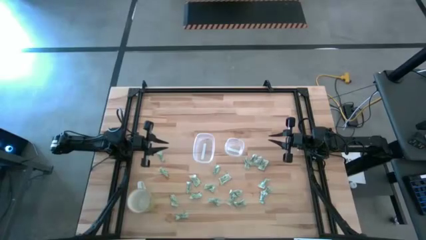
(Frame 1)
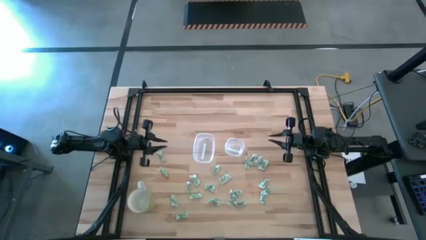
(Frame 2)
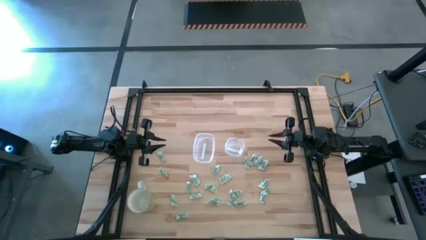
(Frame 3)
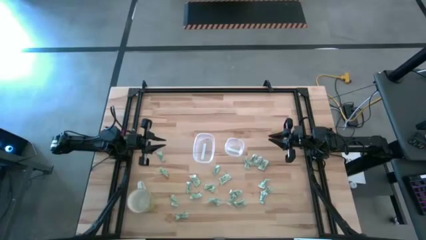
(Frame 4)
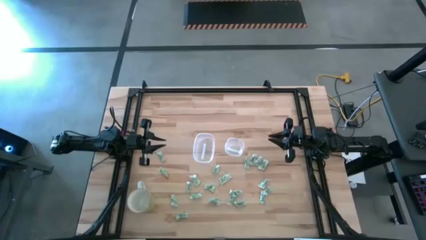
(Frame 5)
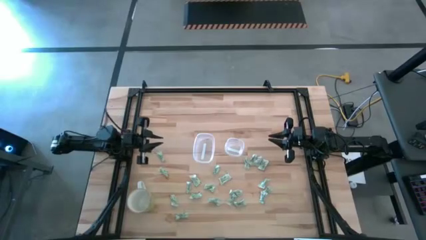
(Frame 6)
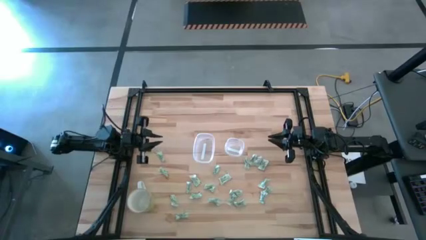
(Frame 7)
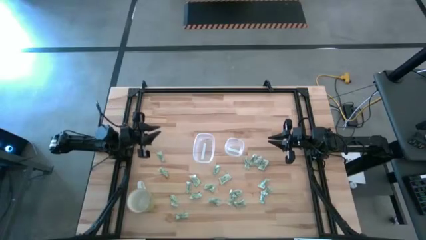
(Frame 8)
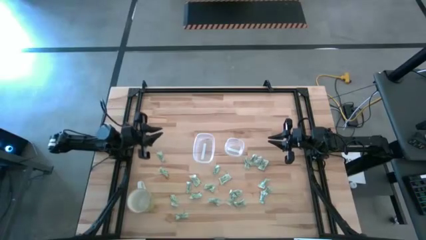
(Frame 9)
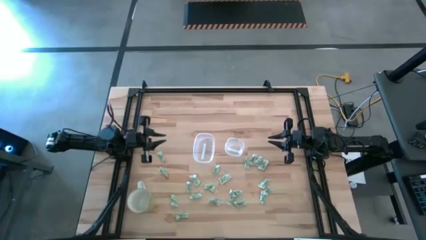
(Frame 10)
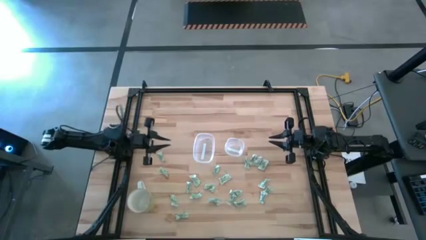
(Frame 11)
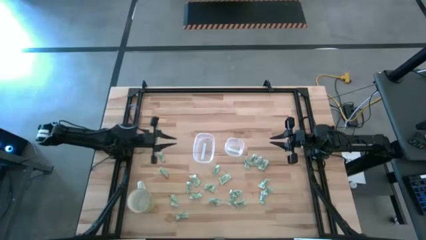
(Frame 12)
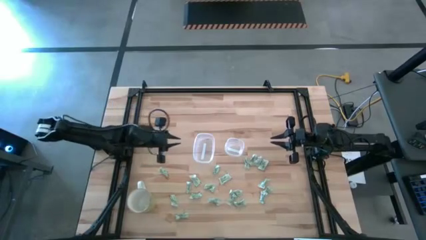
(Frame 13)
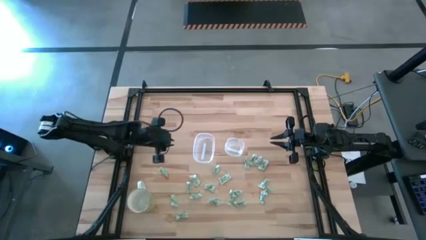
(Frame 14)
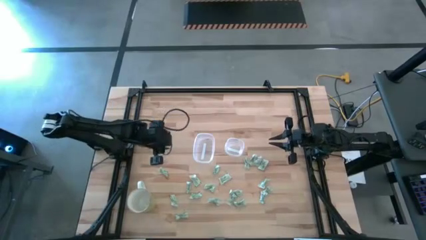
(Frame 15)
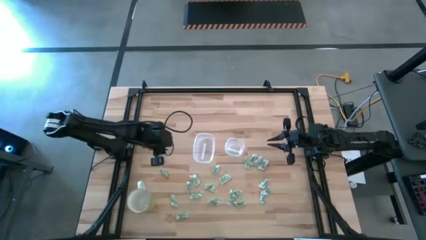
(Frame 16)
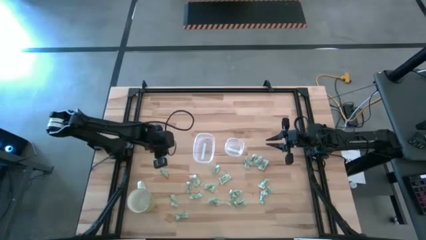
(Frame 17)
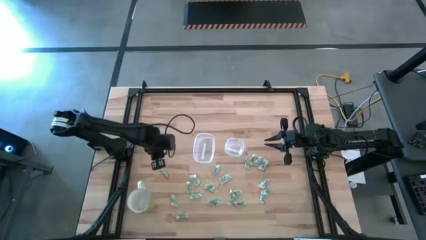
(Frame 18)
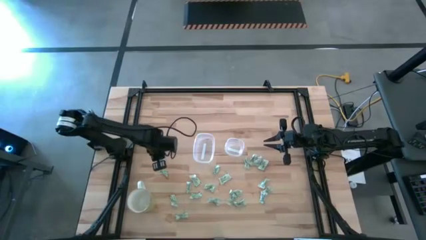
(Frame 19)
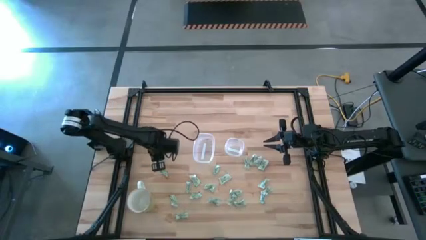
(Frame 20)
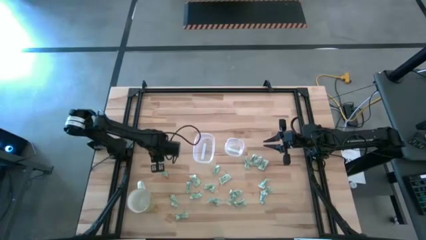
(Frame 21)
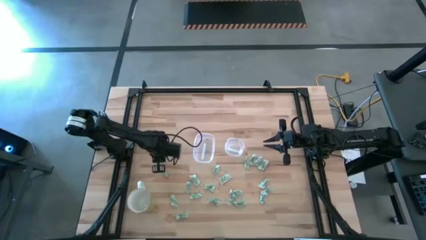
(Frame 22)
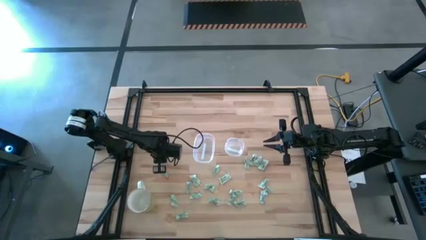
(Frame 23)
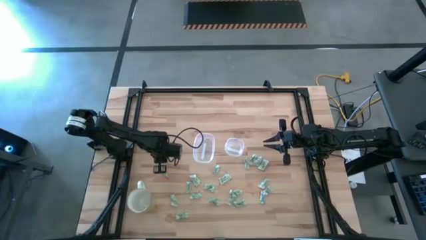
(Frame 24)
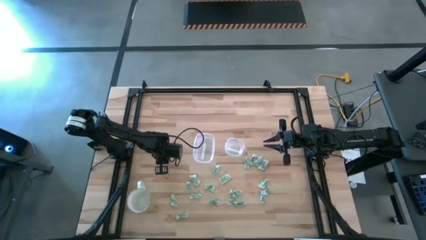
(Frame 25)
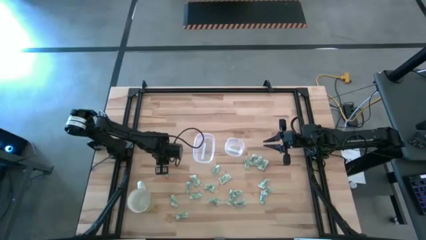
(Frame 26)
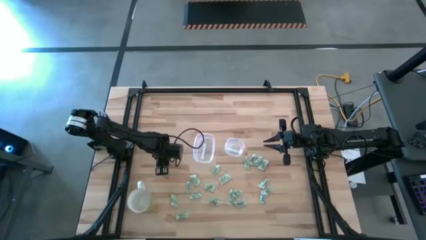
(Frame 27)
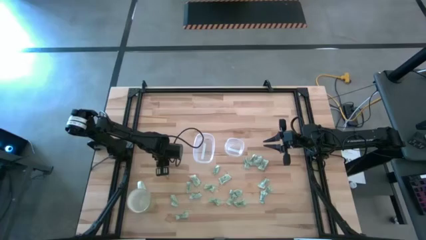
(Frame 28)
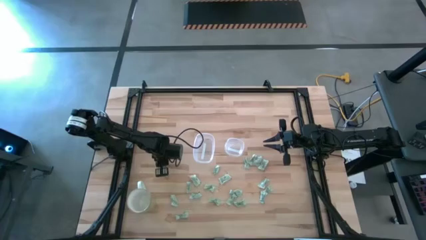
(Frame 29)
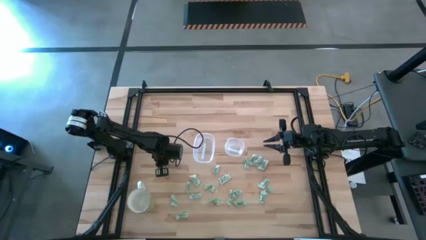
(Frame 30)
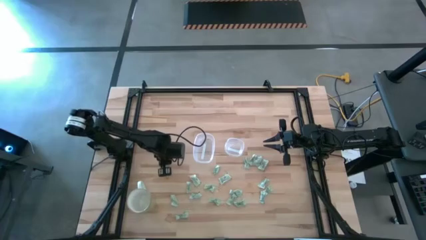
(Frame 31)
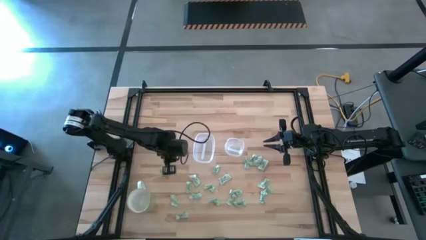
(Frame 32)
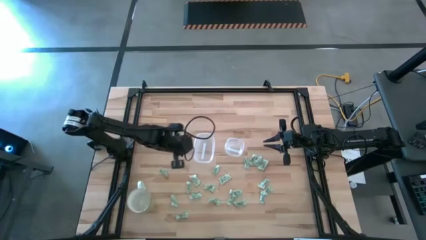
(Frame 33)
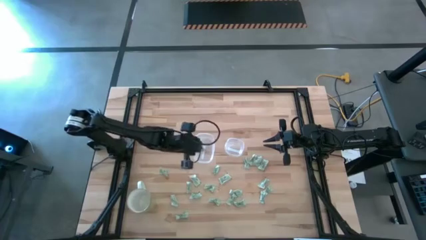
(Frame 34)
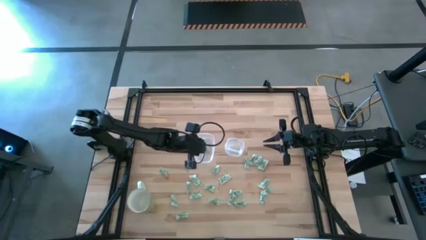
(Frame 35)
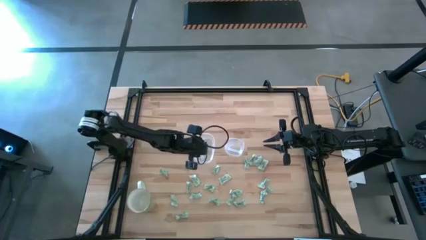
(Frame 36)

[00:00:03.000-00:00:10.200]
Task: Pick and place items into bin
Put the white stevia packet into the left transparent bin

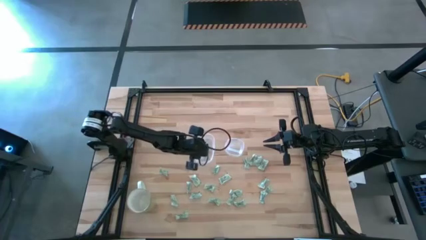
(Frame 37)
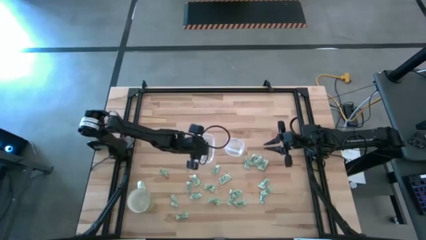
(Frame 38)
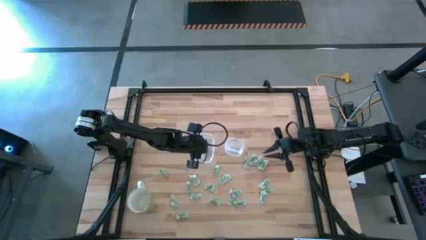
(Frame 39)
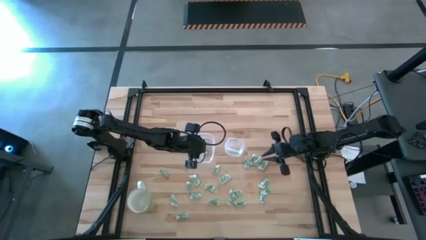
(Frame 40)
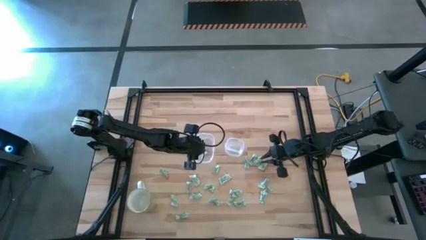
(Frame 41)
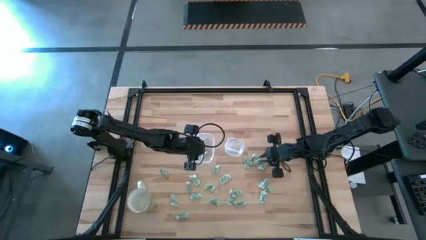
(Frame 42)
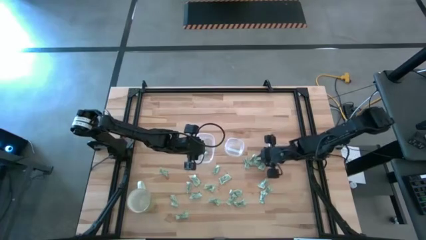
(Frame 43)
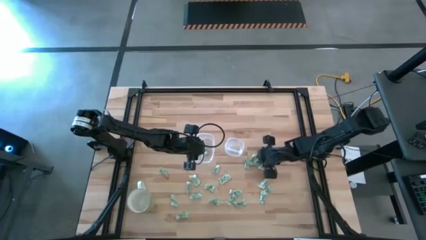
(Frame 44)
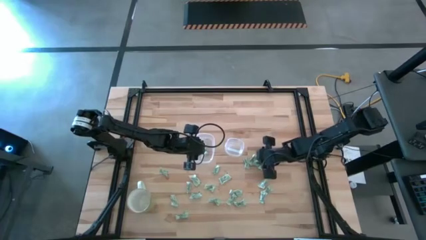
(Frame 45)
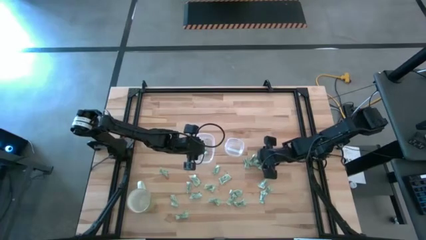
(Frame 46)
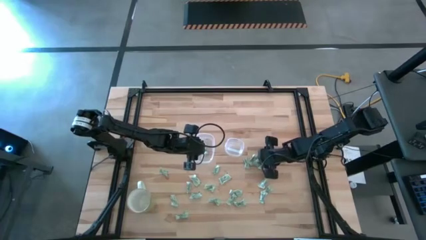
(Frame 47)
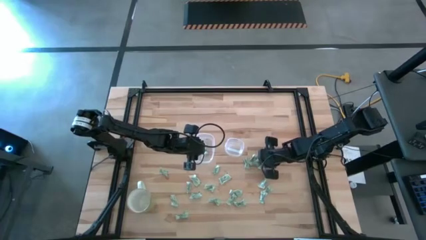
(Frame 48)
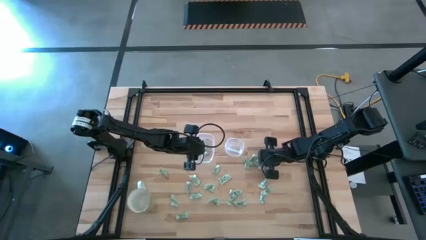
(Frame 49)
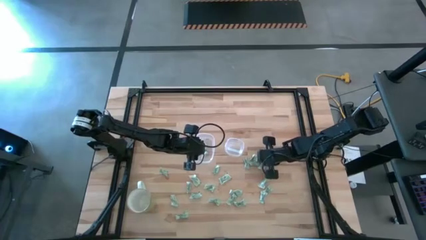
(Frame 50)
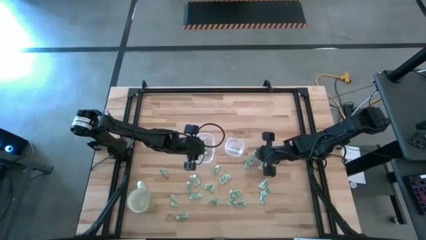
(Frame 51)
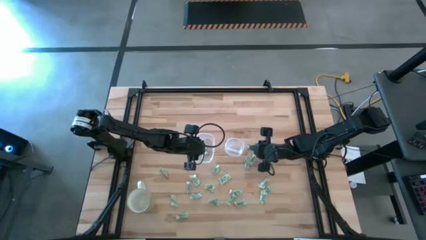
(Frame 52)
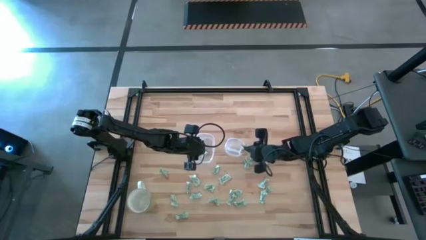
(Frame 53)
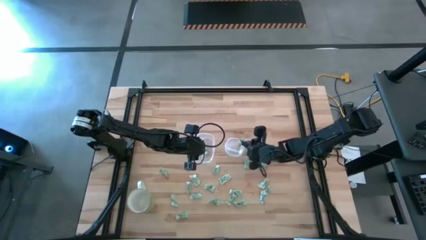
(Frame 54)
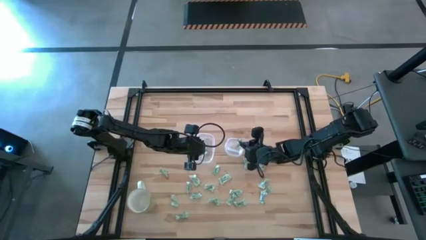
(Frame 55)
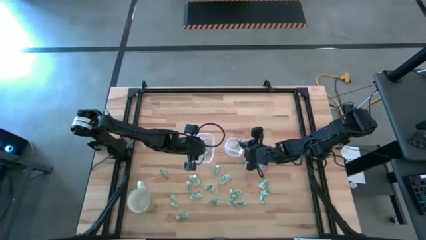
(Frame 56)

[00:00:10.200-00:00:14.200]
Put the white stevia packet into the right transparent bin

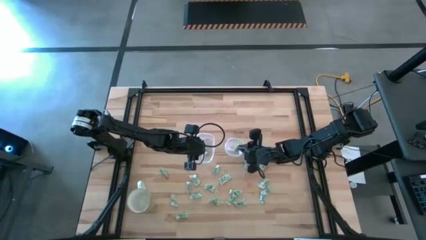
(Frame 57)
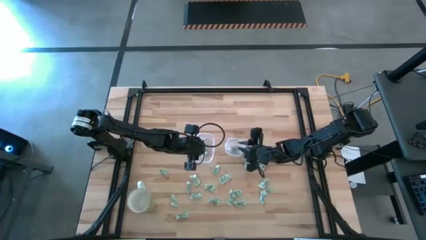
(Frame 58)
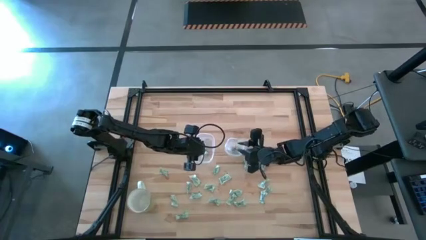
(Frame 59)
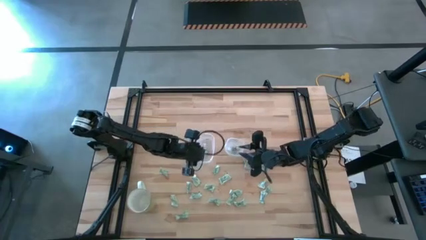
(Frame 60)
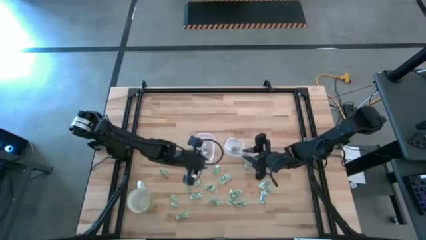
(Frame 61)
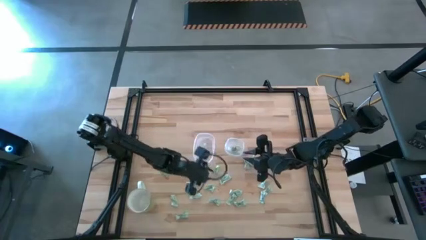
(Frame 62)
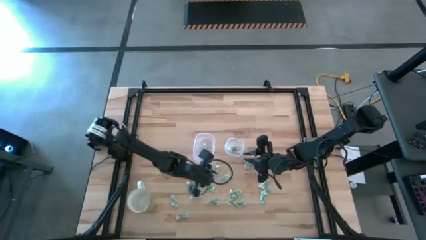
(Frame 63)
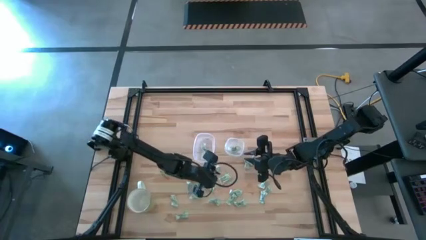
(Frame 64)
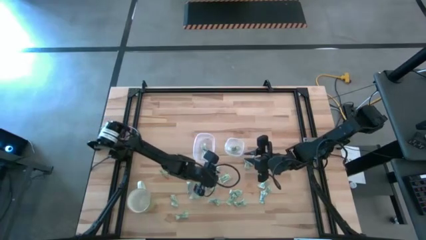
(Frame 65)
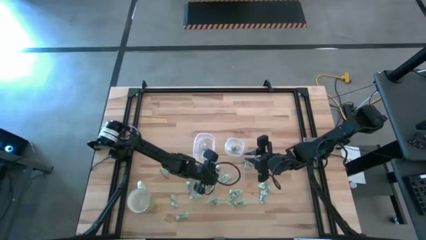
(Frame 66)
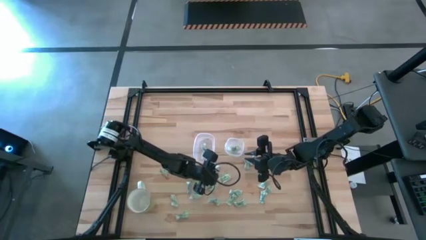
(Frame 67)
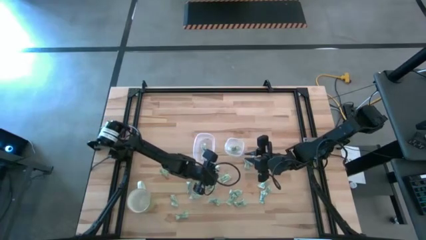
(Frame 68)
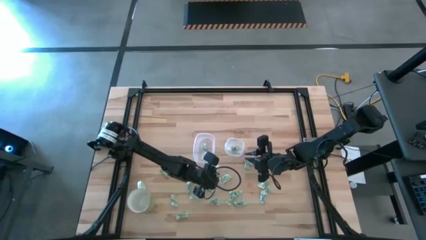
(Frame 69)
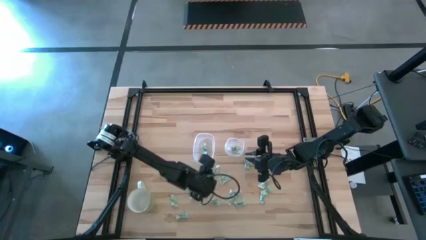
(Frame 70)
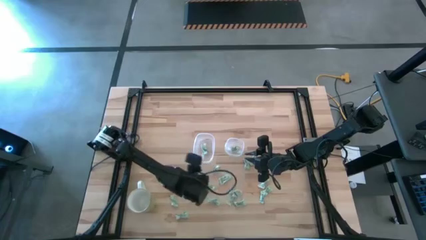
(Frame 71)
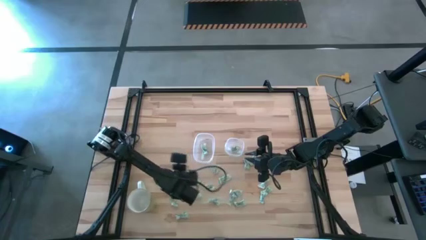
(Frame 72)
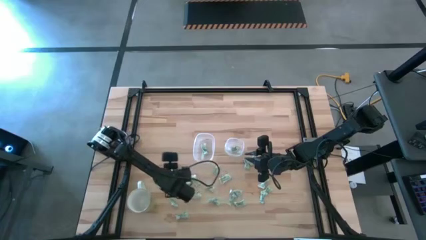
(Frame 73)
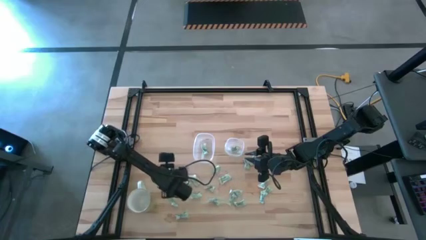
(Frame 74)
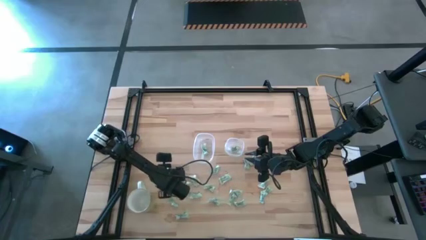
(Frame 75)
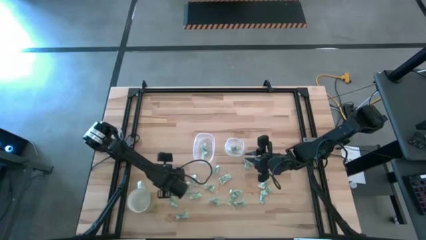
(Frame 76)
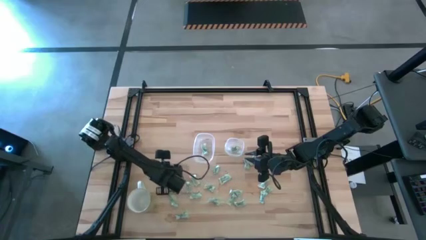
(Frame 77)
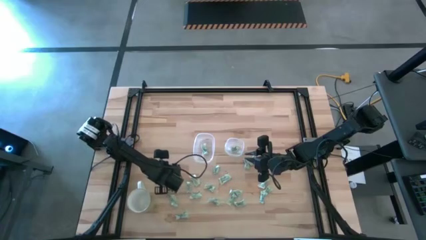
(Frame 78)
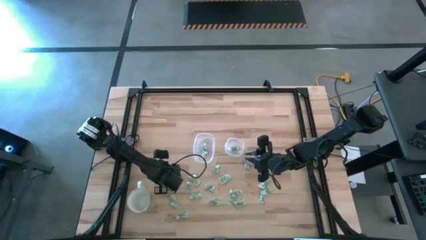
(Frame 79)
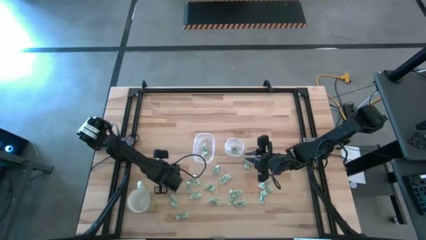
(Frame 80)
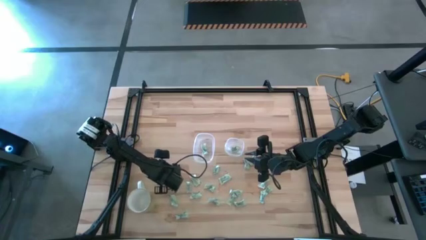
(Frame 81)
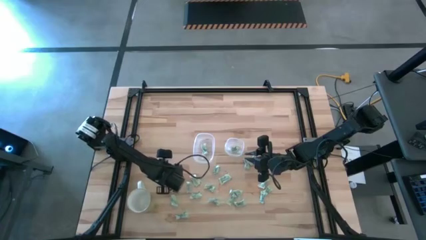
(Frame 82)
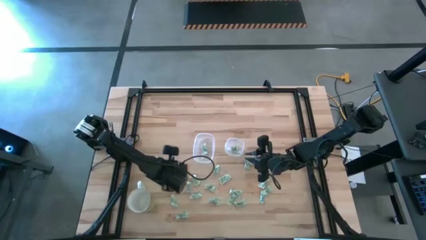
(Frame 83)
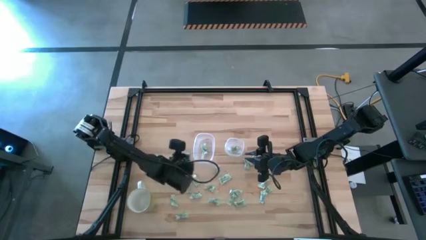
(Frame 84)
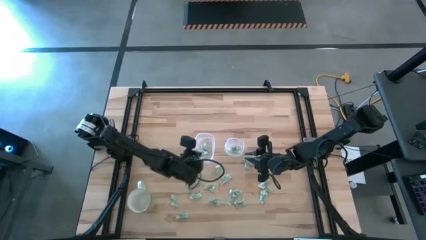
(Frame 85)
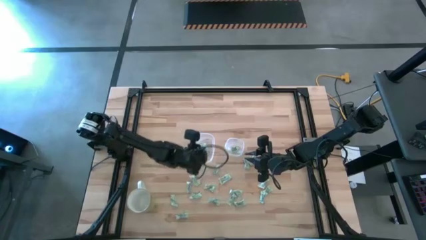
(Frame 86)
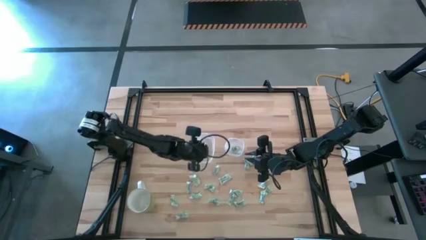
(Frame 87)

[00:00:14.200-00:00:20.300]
Put the white stevia packet into the left transparent bin
